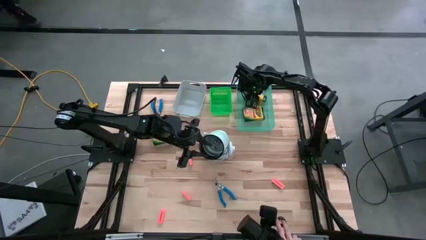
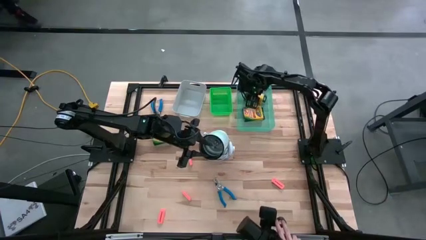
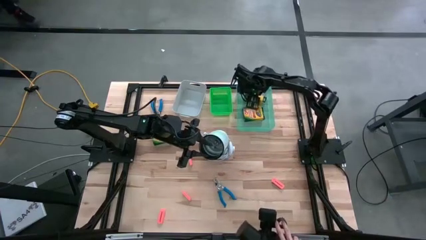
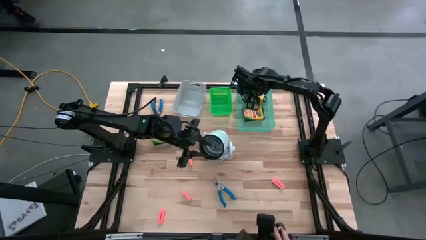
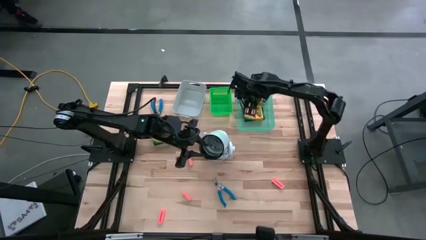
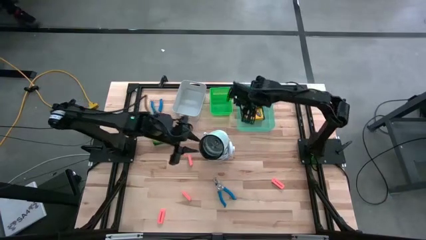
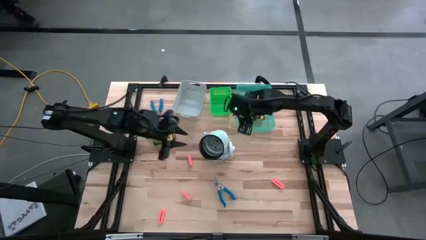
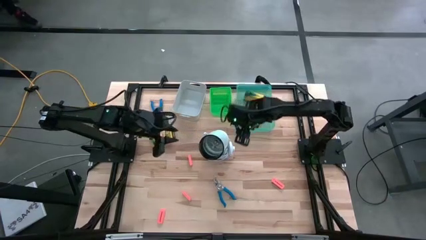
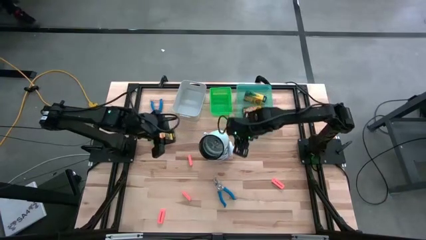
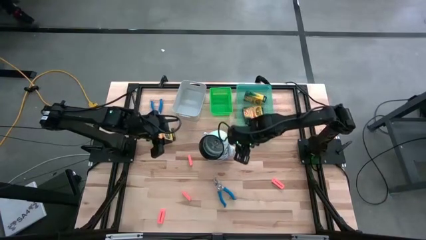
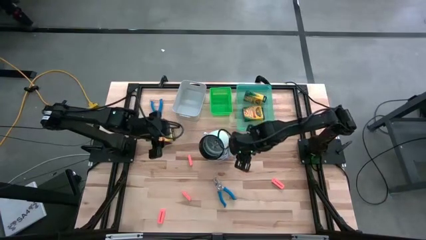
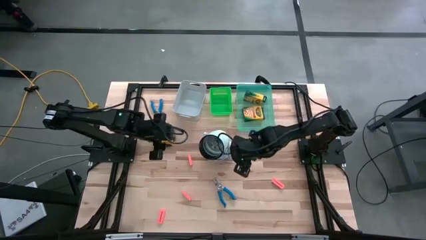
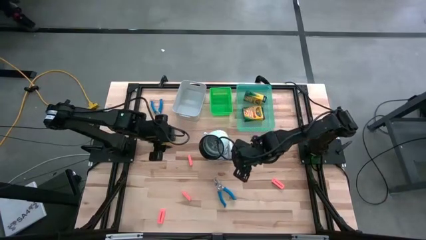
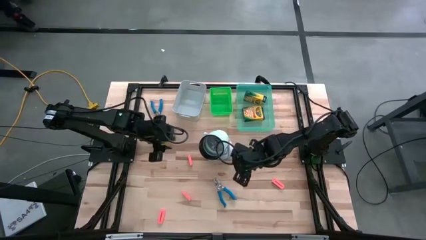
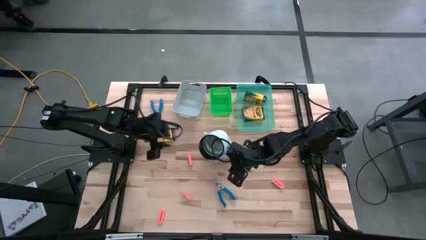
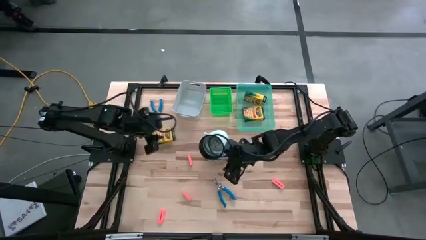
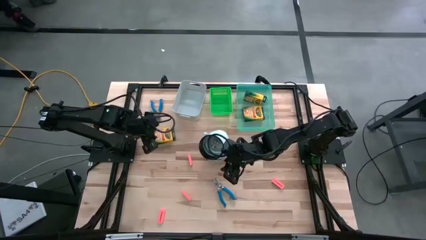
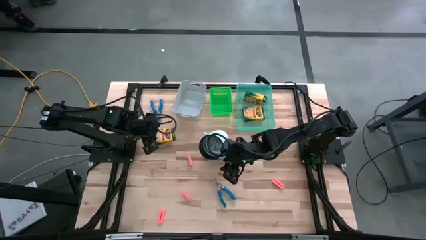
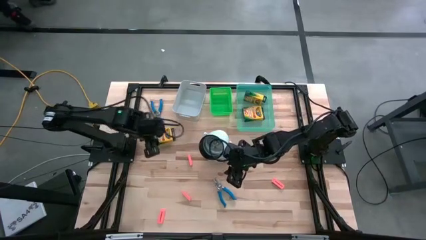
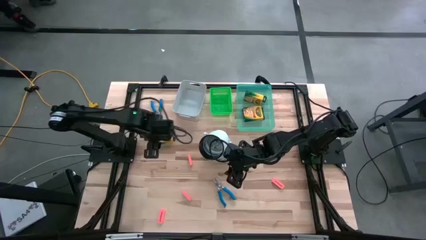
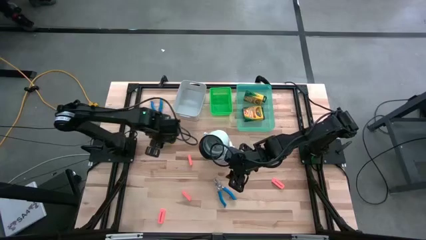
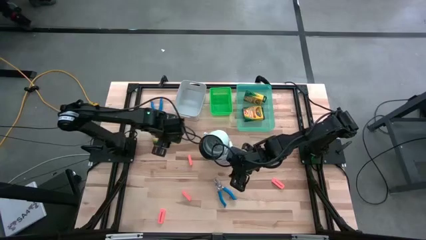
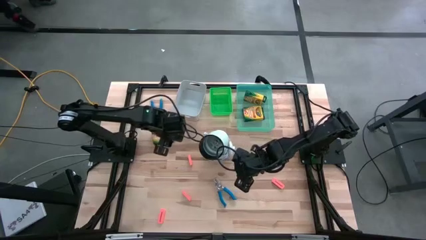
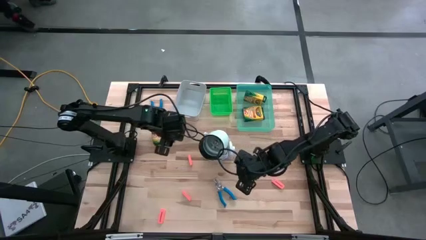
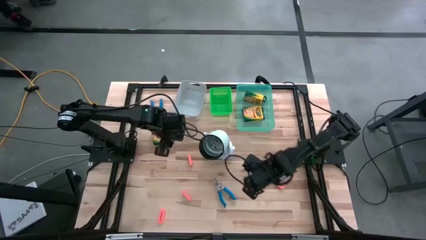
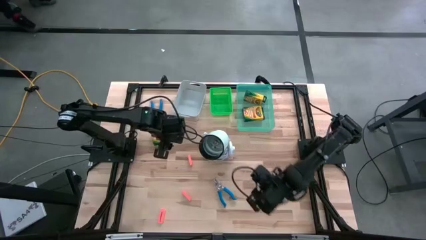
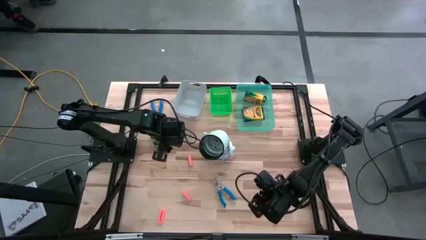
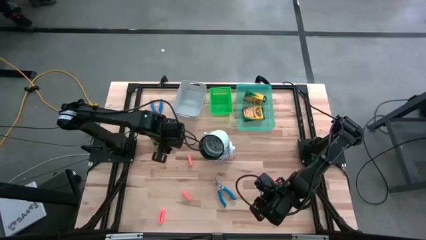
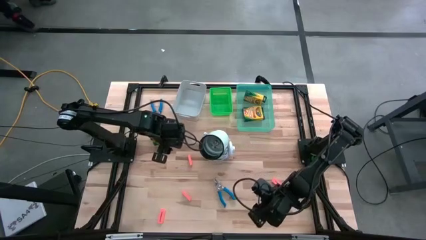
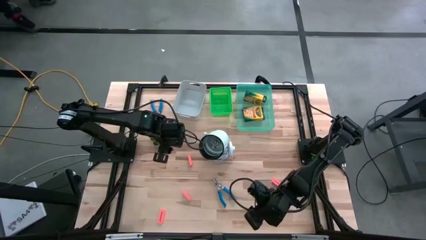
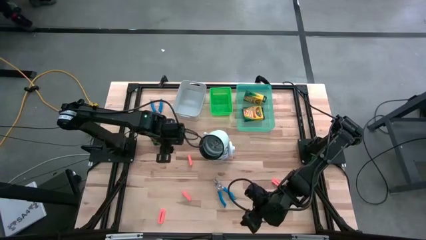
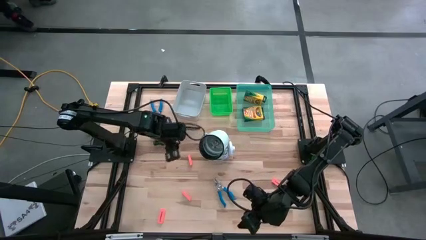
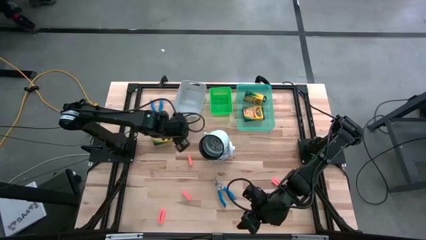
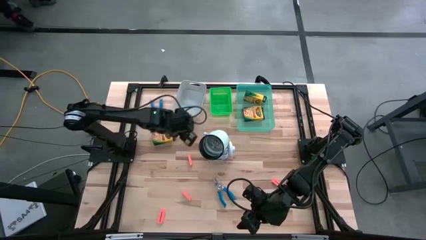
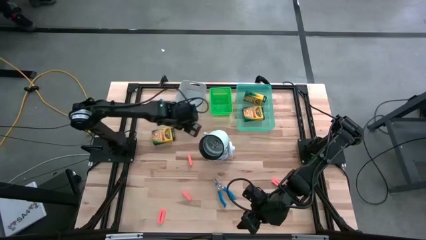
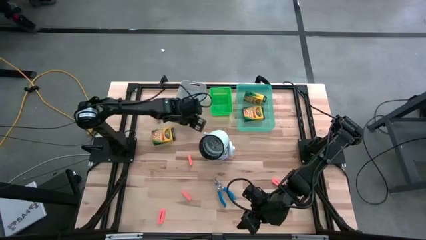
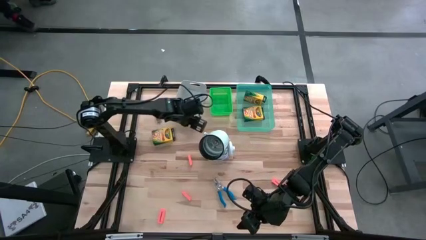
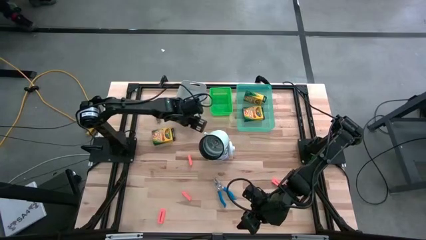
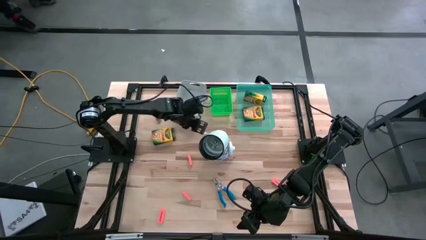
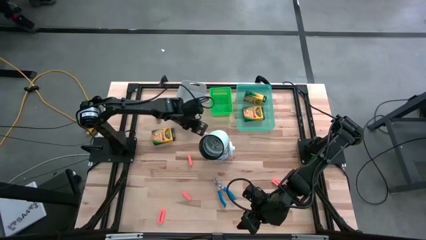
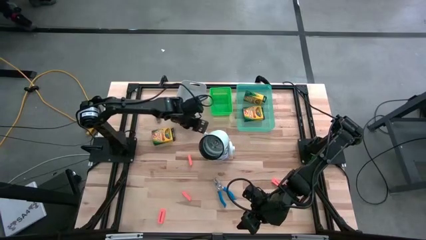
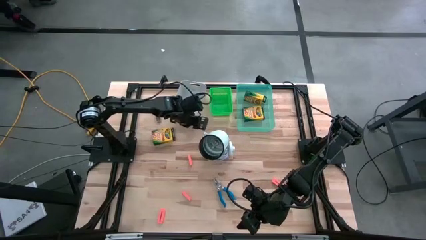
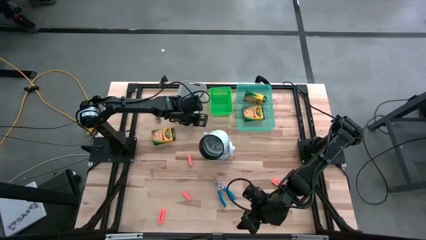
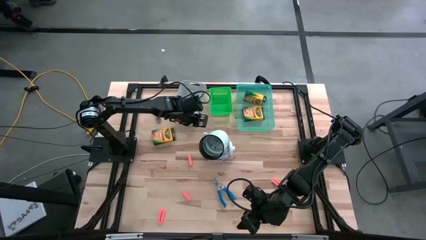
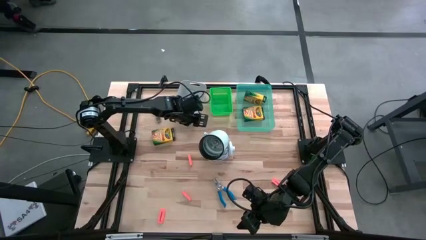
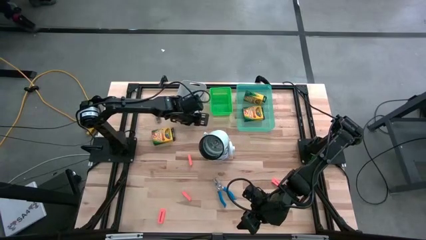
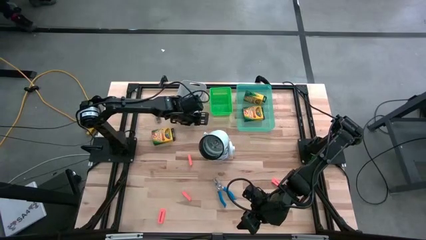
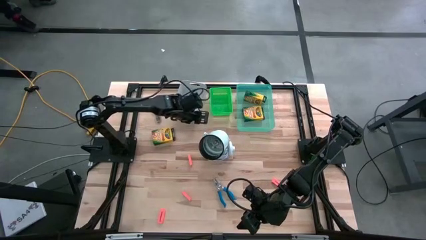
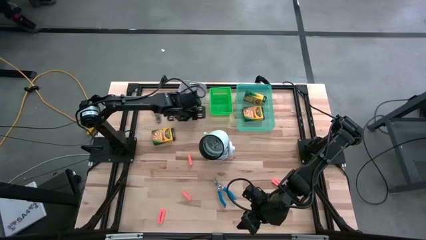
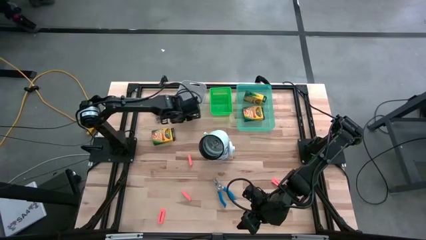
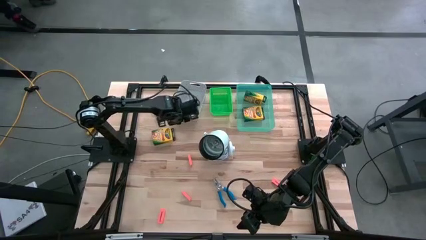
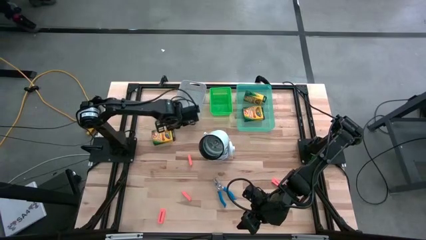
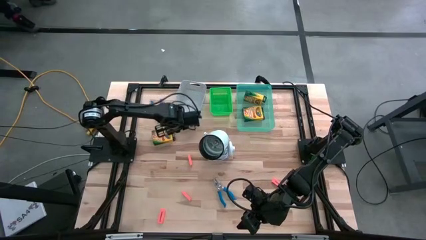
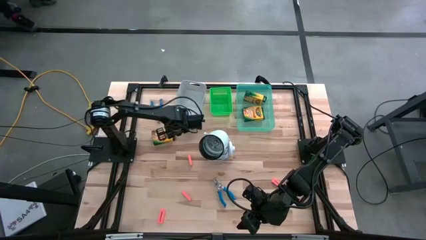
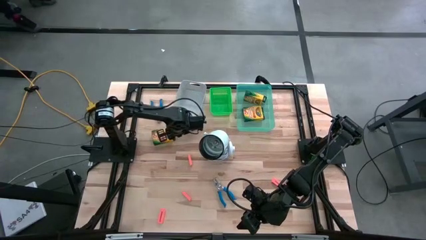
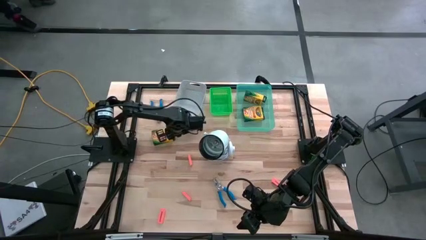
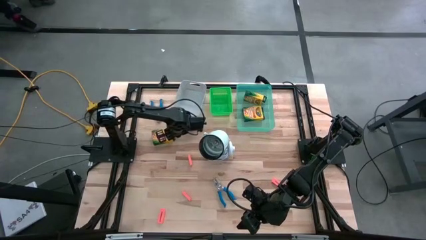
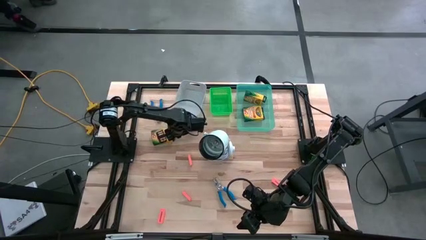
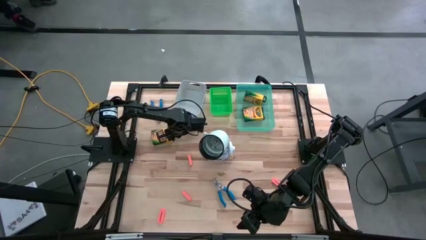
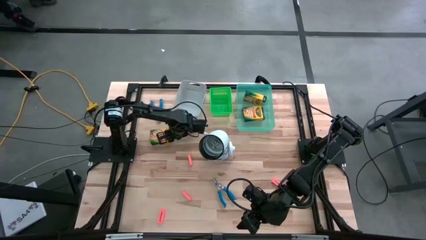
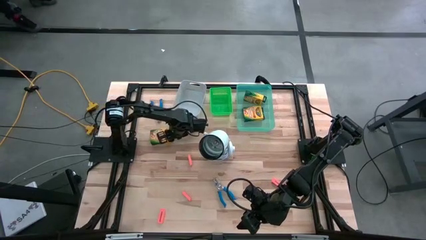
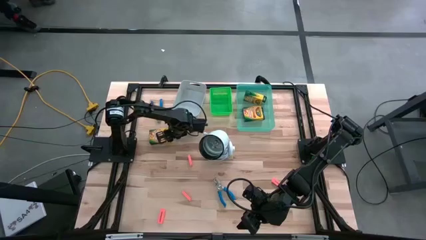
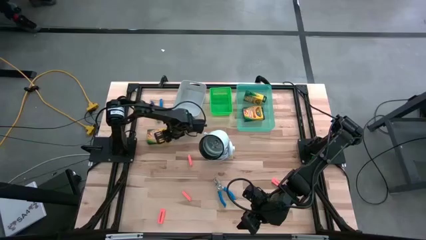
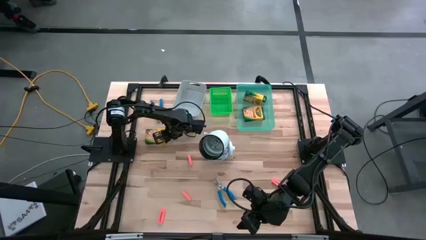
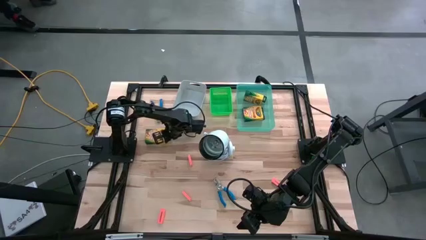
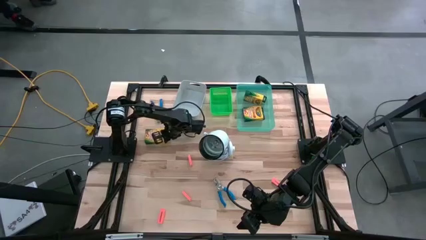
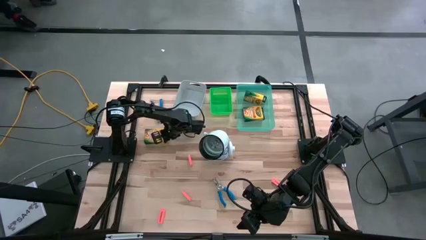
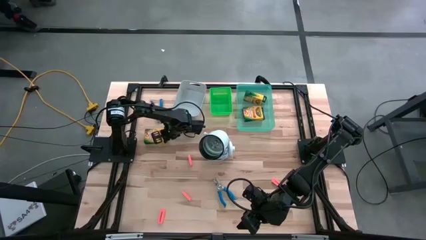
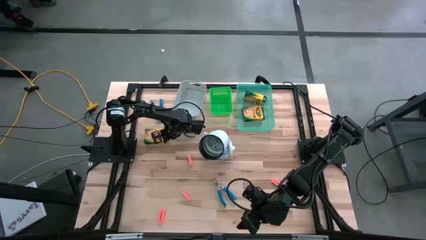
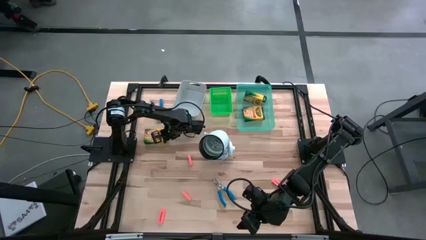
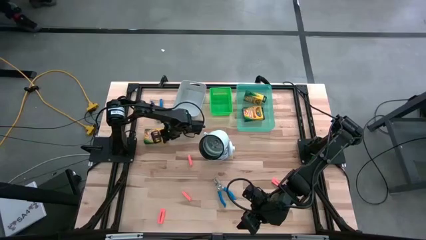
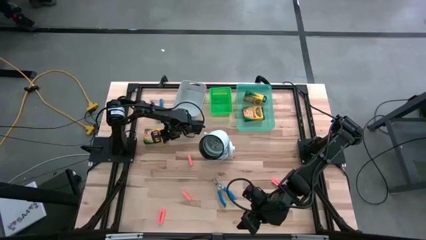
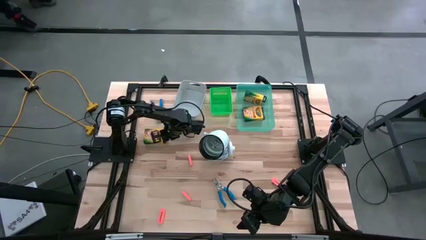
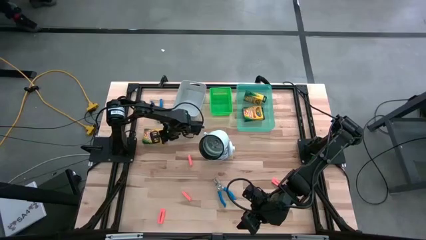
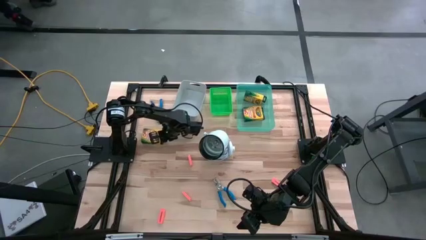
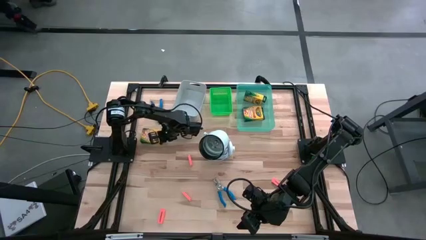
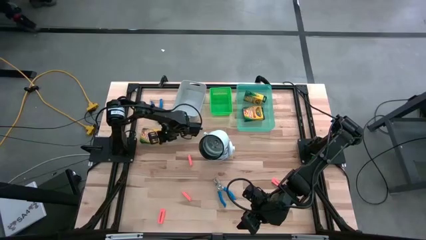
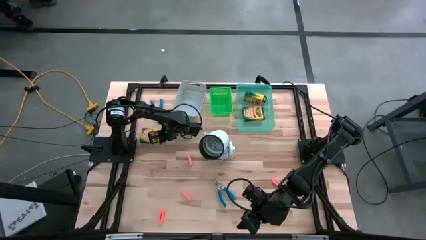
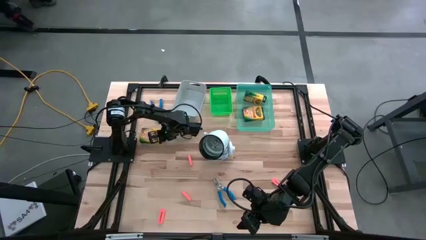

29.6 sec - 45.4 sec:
Task: Pick & Place School Supplies
Put the yellow crayon box into the blue bin
